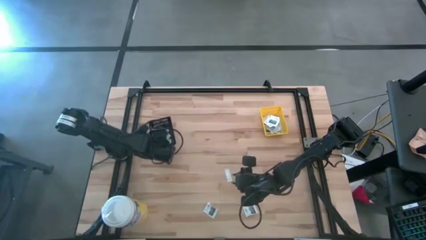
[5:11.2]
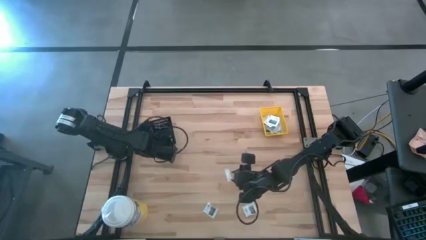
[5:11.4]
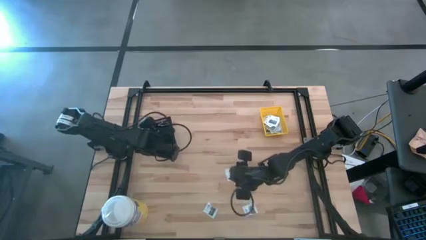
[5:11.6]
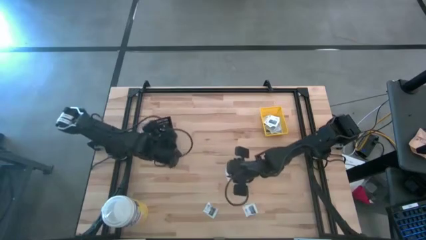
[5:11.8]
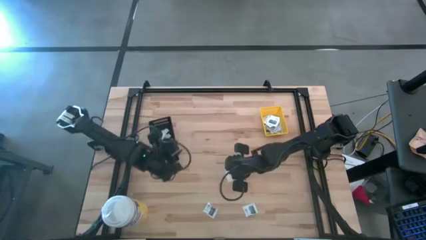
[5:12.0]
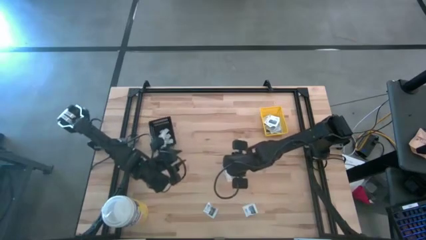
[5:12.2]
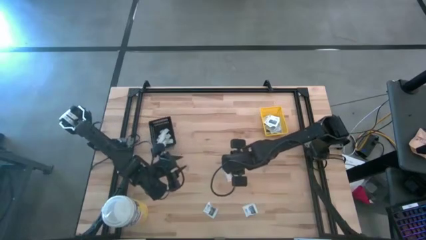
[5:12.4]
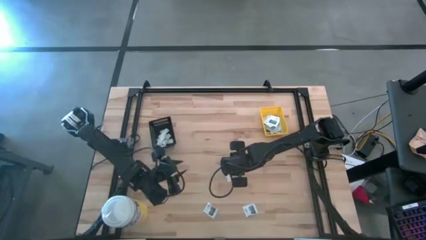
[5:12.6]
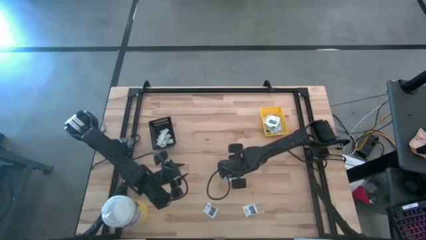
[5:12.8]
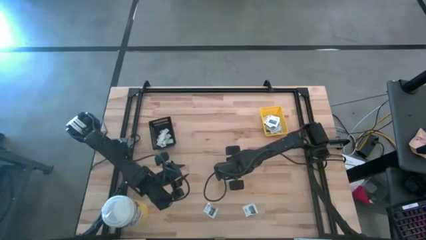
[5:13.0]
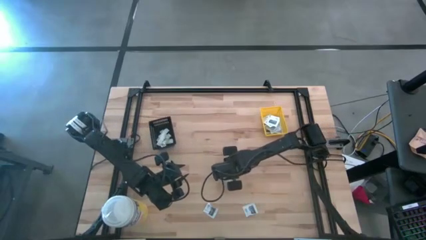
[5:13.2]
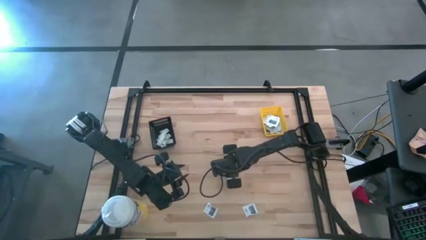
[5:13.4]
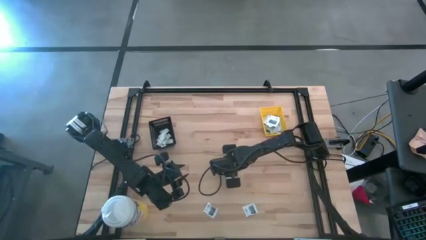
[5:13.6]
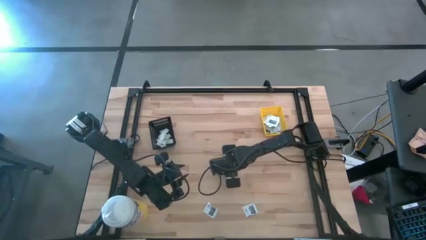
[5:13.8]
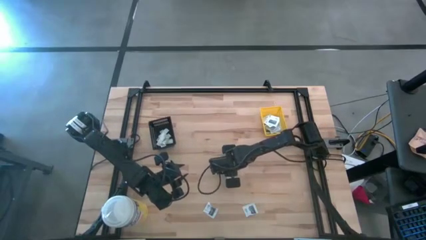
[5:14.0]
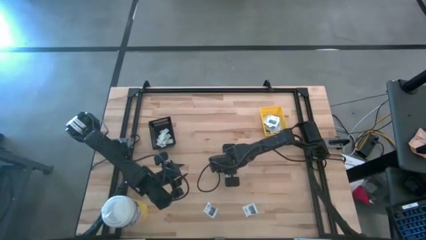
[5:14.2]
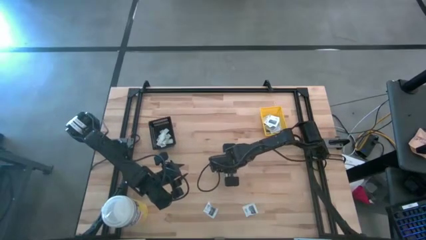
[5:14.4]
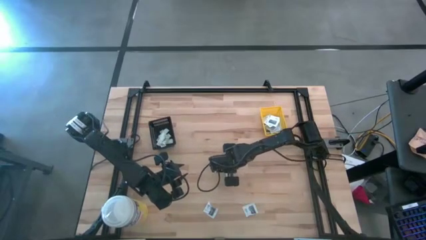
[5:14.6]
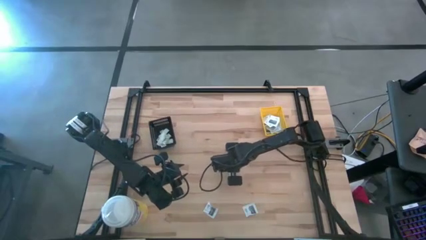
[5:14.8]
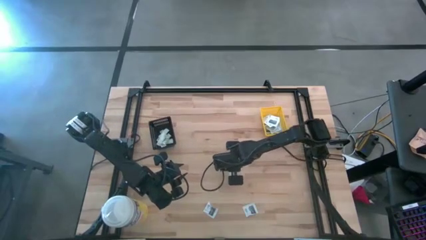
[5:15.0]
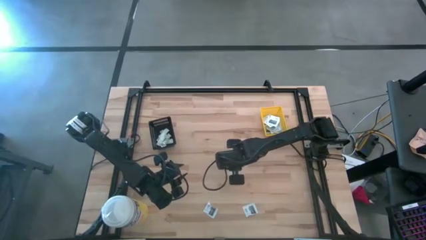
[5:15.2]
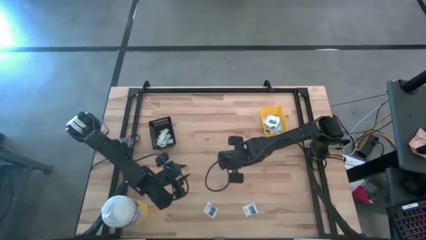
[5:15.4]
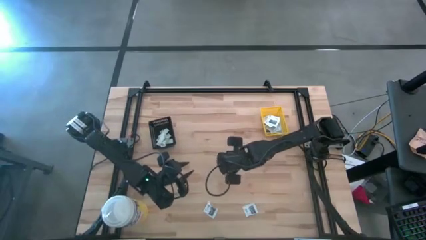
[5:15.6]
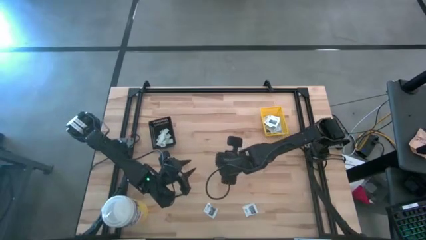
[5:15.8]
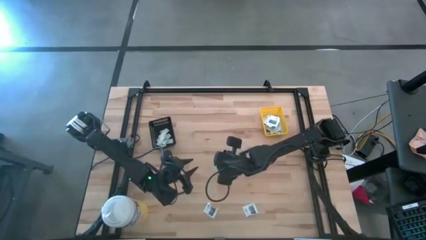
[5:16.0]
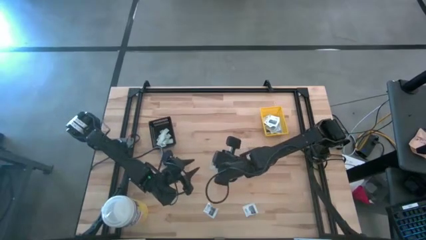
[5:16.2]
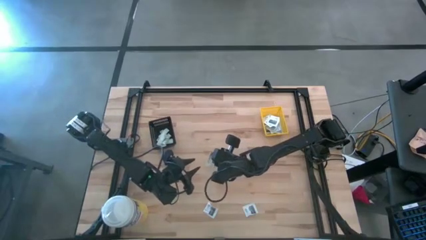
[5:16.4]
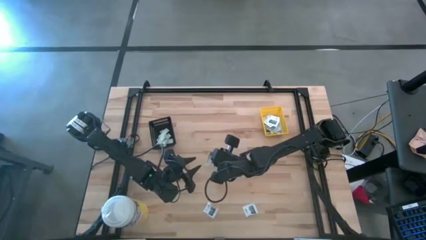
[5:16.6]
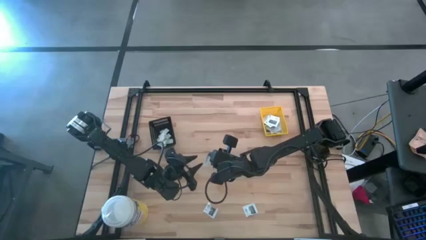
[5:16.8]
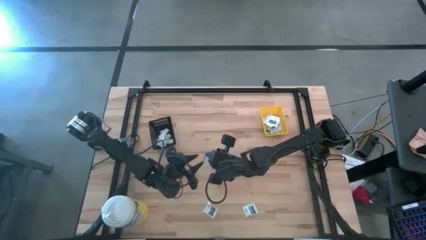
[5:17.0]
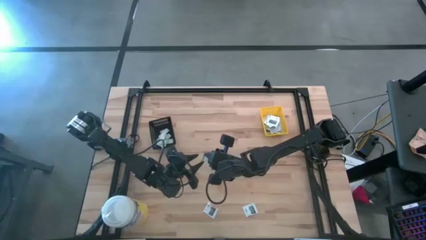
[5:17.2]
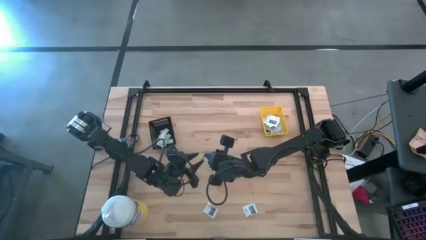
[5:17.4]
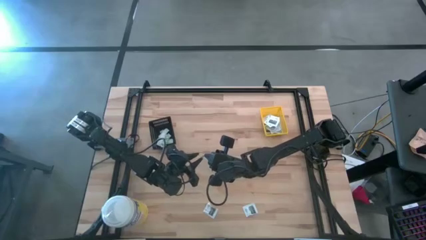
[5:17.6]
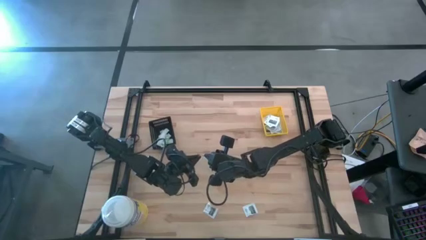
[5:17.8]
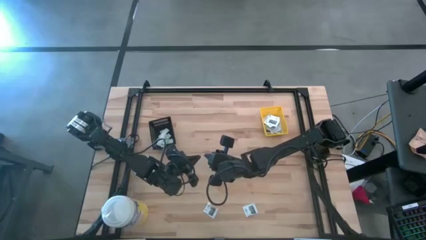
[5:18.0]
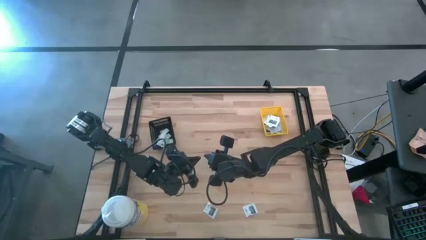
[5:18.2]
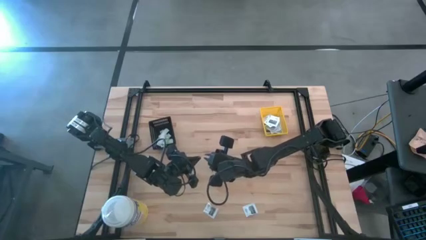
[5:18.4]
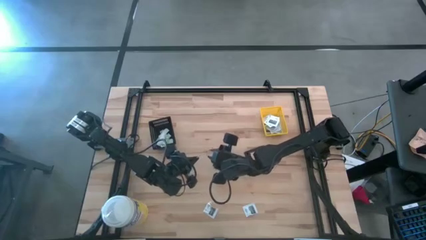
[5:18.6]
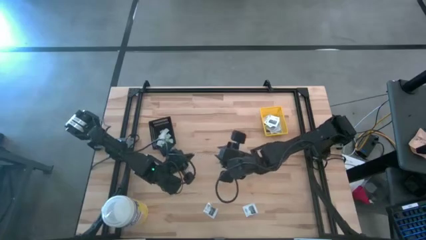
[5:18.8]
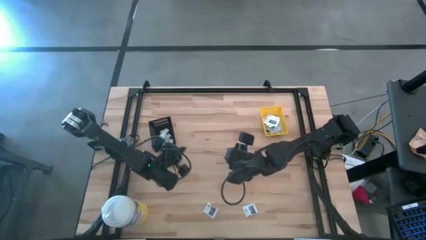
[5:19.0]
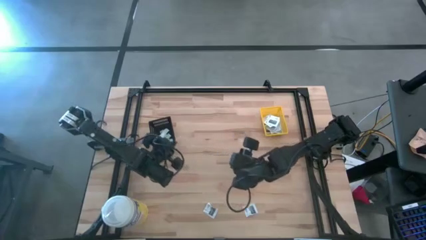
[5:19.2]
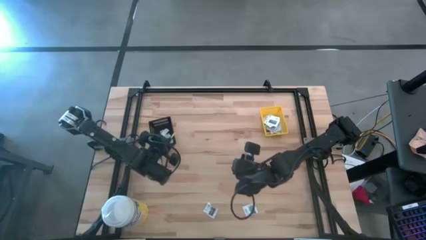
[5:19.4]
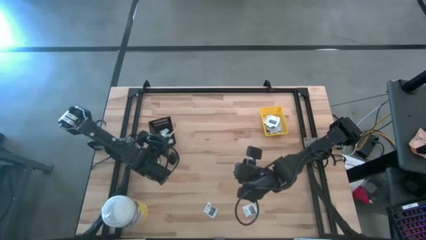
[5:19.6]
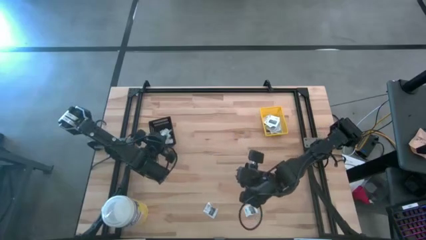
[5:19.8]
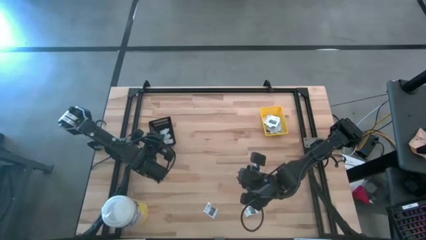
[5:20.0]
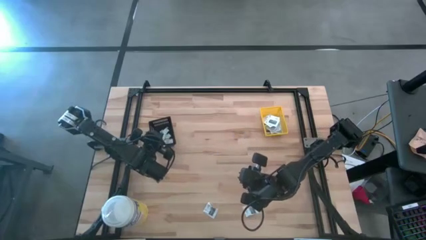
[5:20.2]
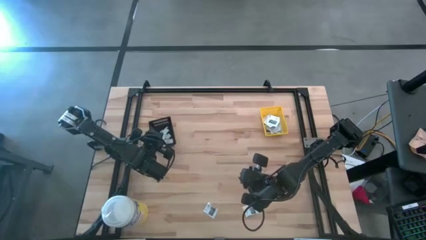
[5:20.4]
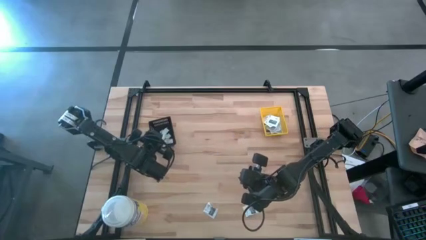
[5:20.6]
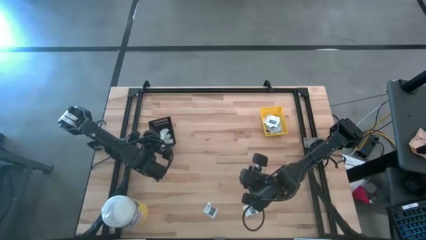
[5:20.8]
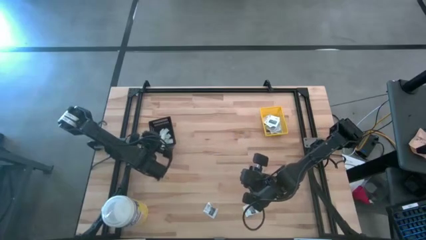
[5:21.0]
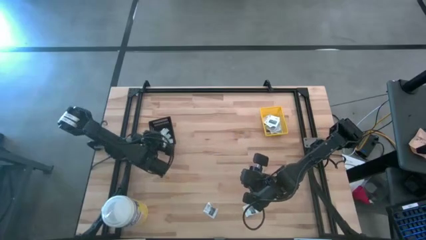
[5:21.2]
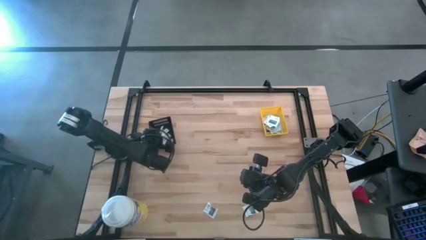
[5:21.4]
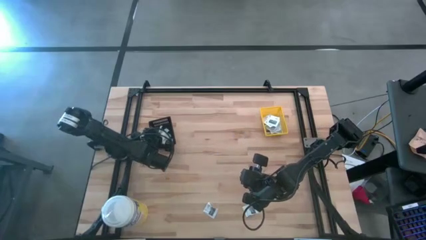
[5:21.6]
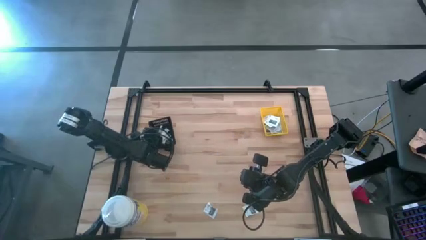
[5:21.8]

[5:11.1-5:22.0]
Task: Pick & Place First Aid Supplies
Put the green bandage into the black bin
